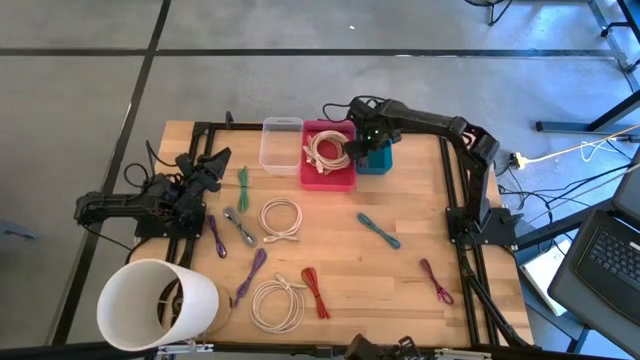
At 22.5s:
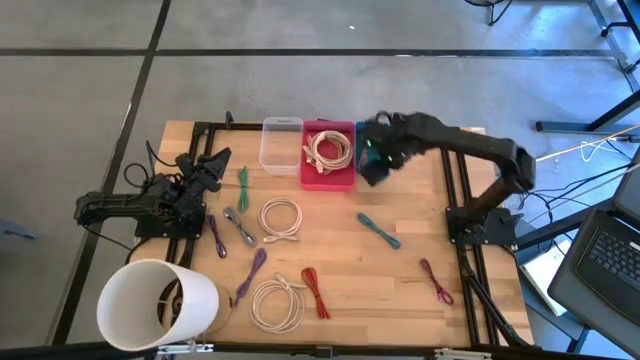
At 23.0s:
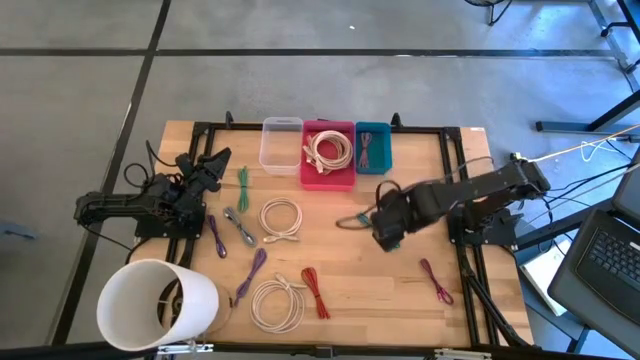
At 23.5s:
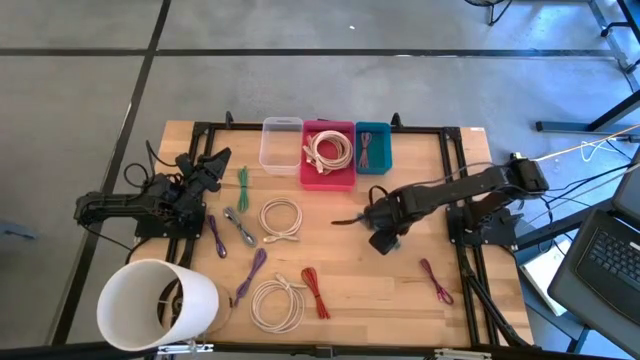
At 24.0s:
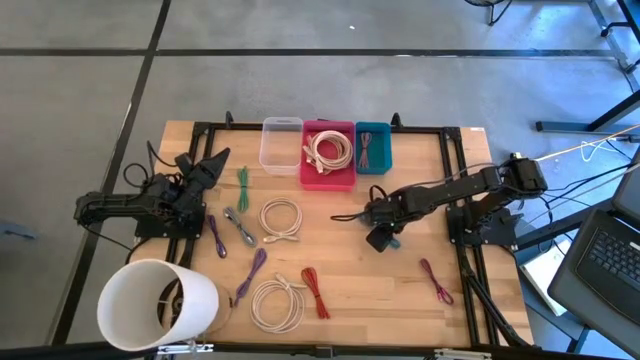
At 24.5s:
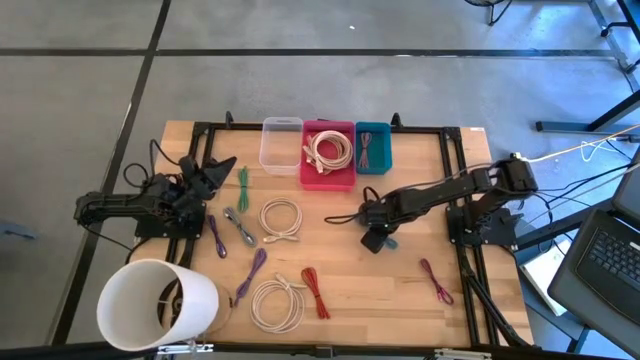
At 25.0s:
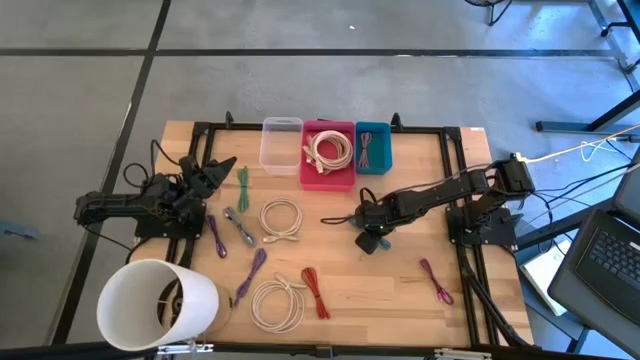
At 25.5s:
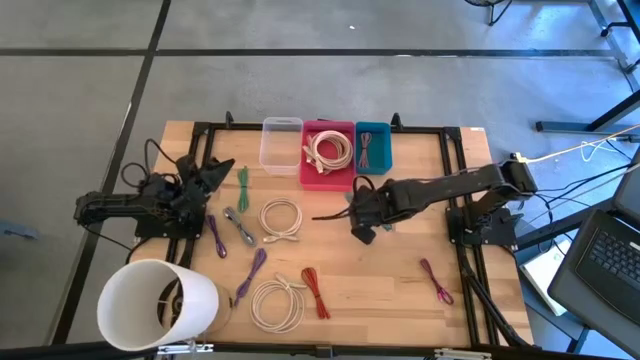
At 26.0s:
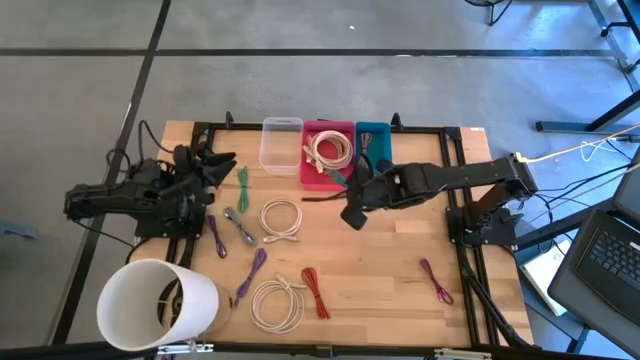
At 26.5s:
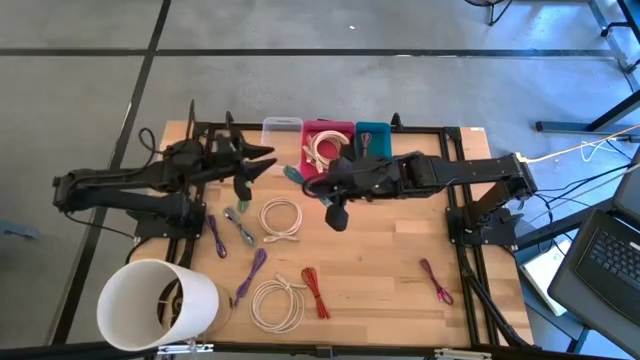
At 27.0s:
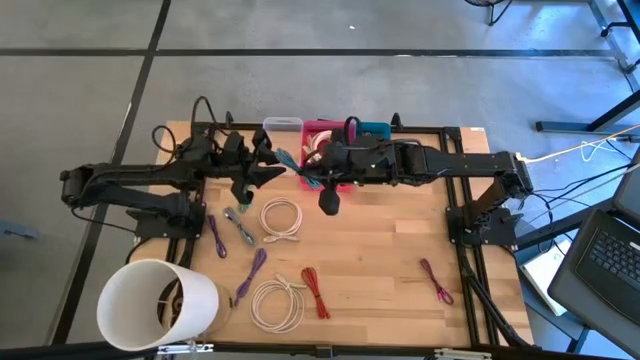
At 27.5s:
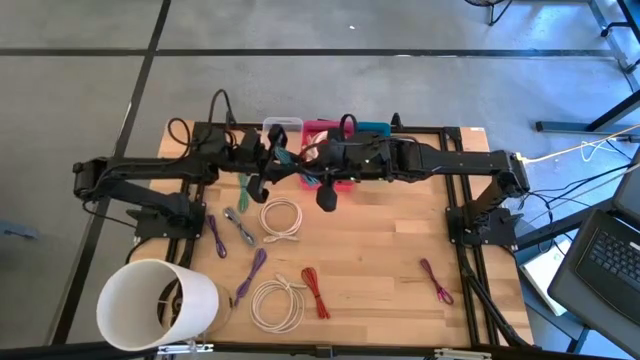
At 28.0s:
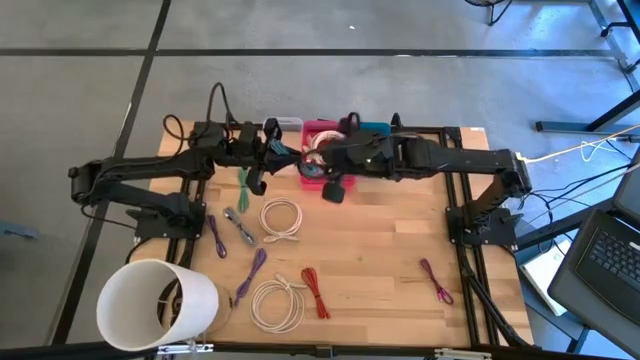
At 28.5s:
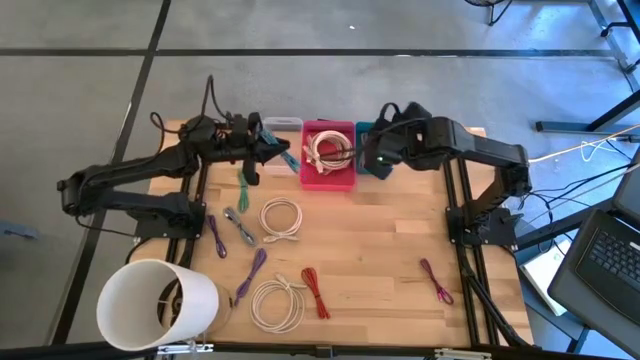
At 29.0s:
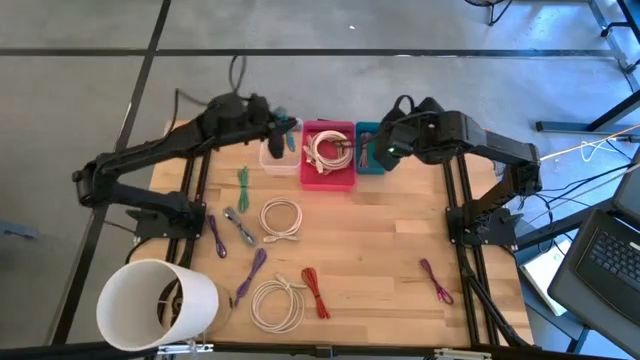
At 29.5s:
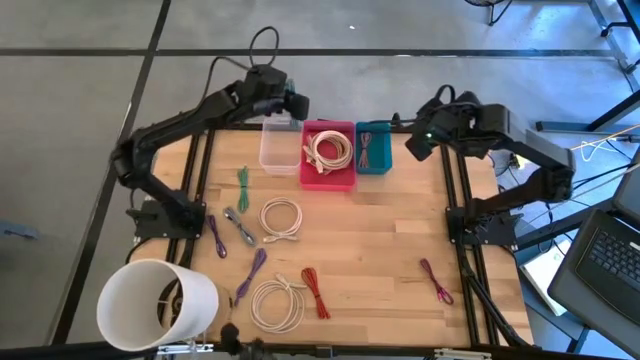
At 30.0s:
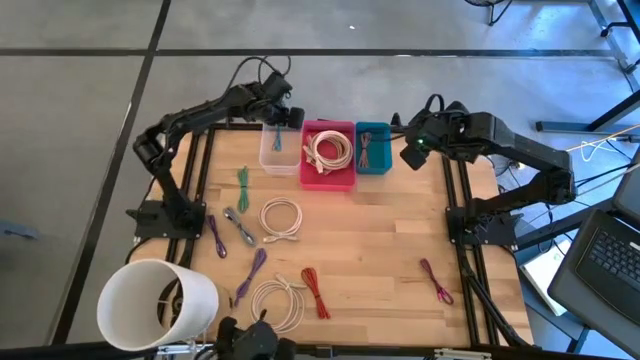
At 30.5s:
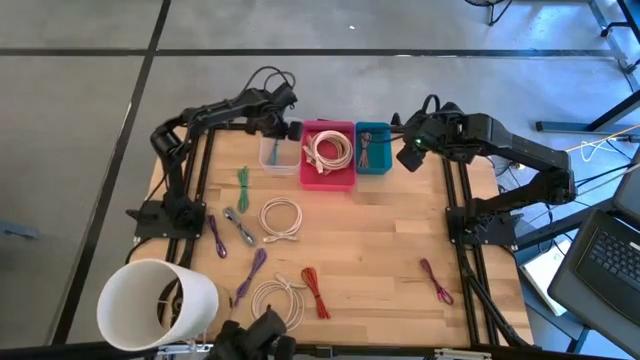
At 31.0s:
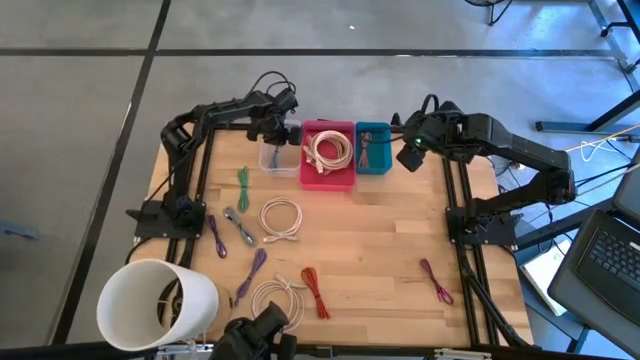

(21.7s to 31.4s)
Task: Pick & Place USB Port
Put the blue patterned USB cable into the transparent bin

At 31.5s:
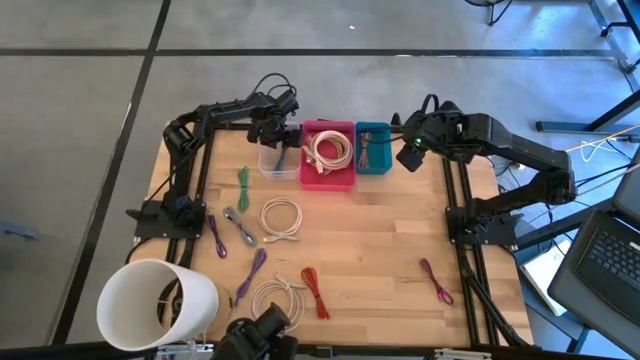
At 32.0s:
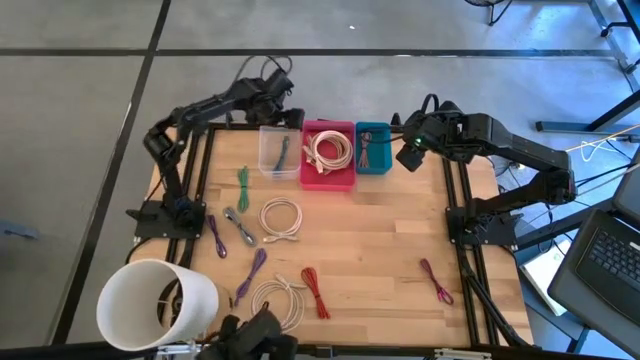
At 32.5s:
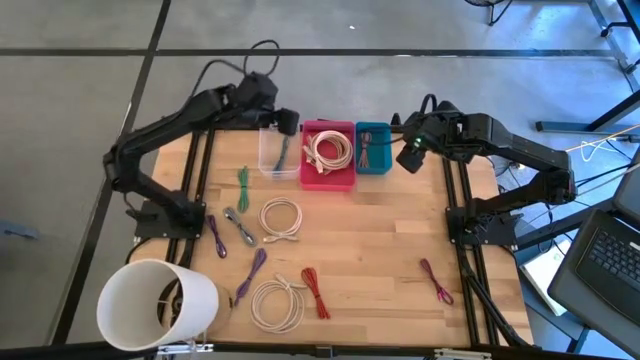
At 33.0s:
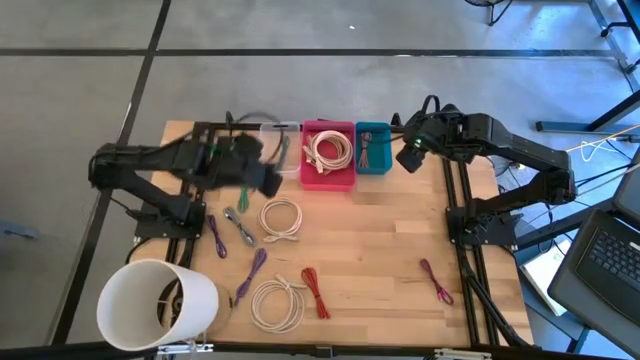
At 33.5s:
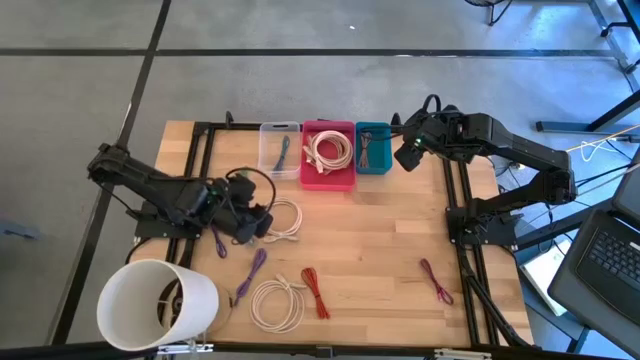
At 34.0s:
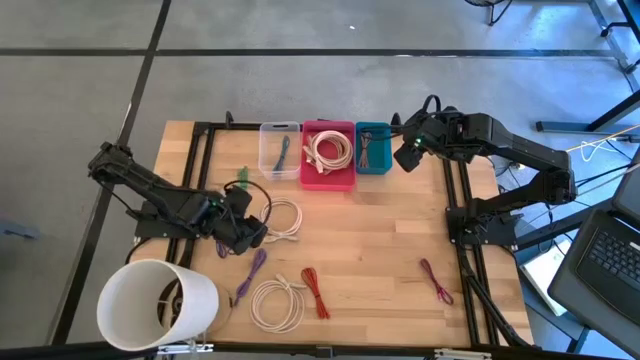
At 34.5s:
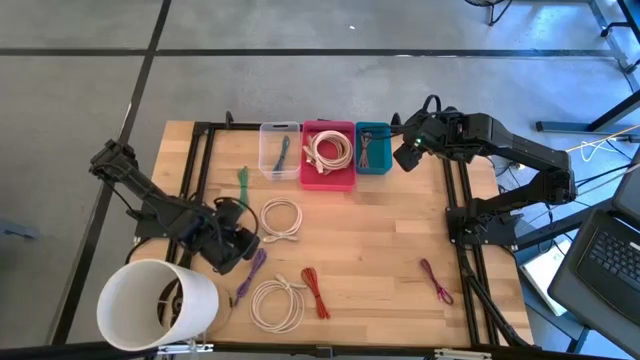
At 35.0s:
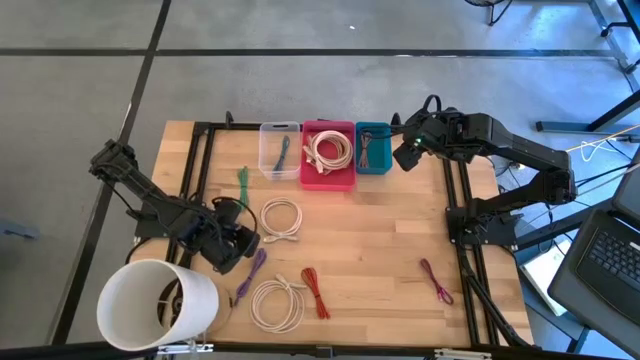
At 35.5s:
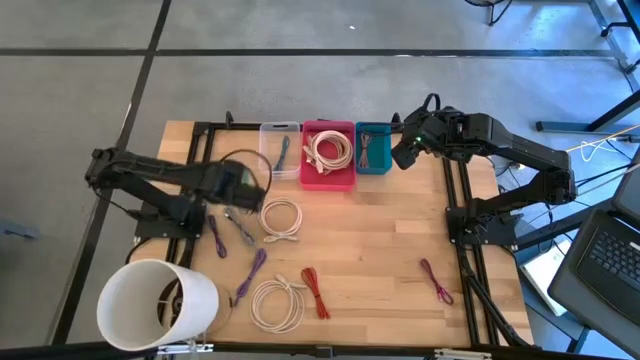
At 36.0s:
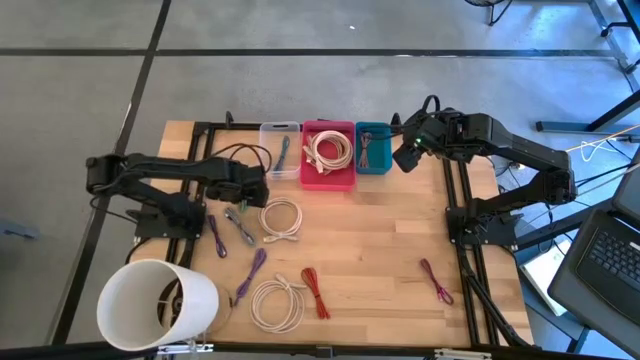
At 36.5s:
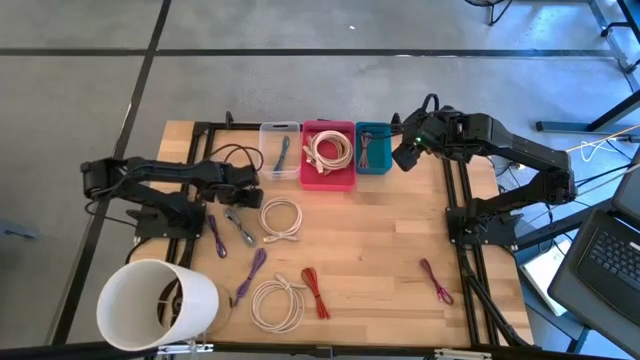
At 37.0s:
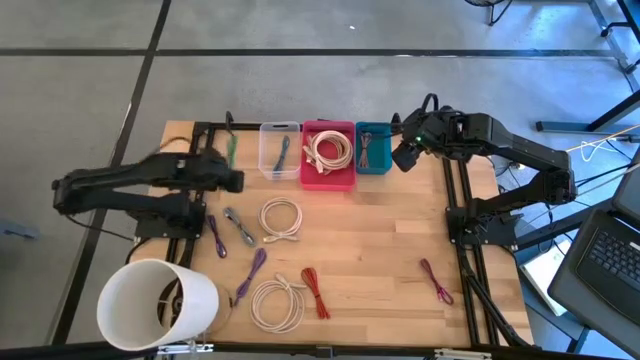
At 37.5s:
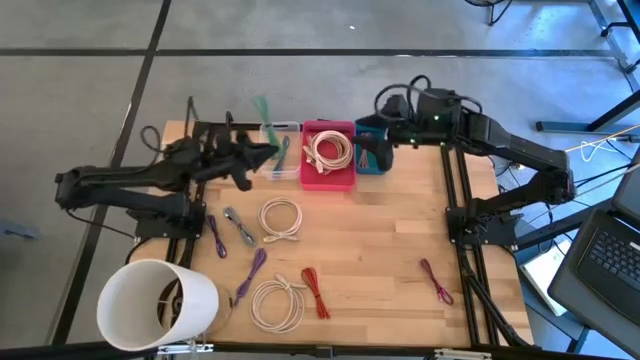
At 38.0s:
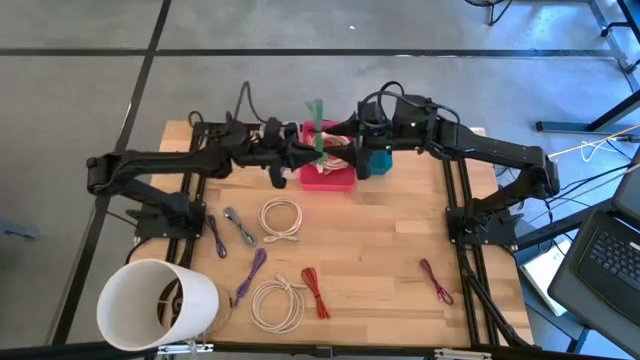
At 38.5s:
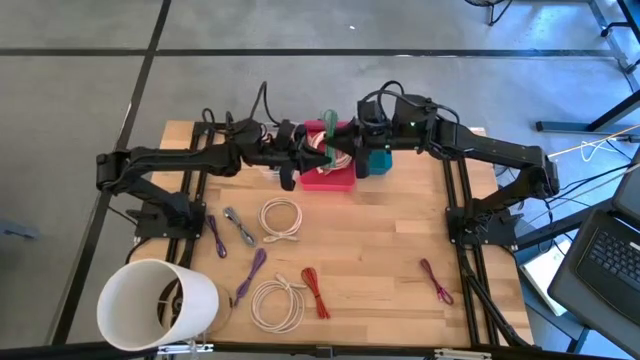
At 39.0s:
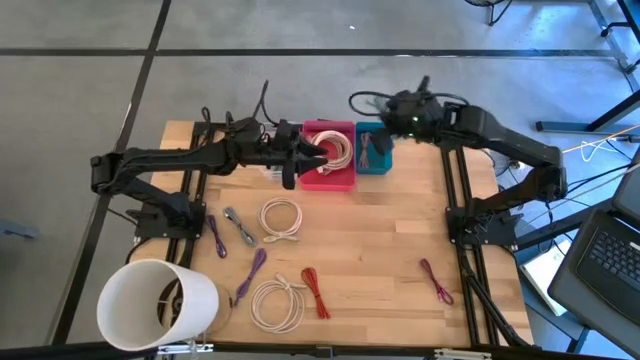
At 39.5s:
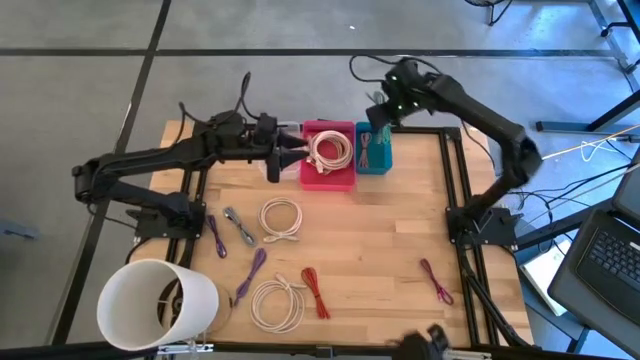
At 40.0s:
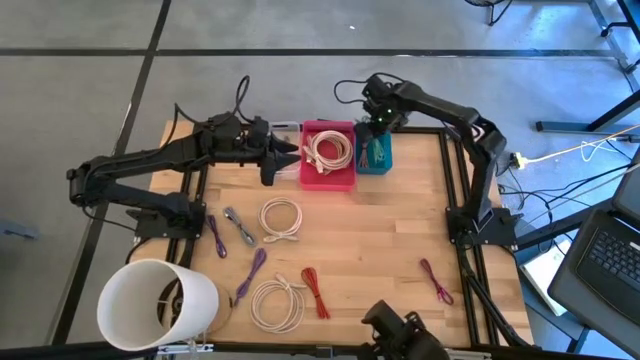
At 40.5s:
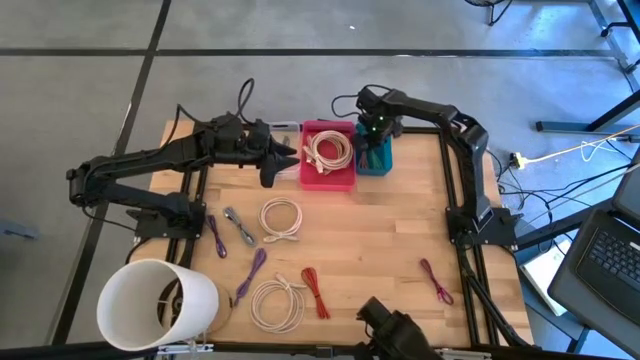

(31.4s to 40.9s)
Put the green USB cable into the blue bin

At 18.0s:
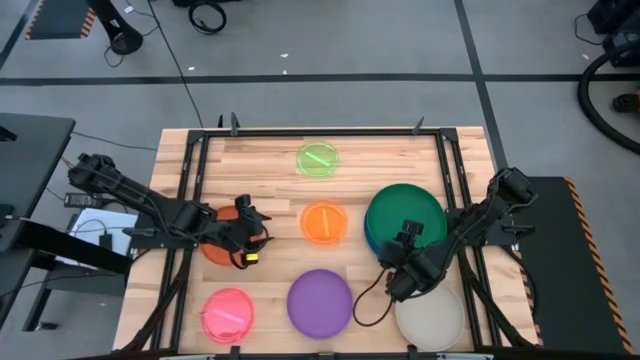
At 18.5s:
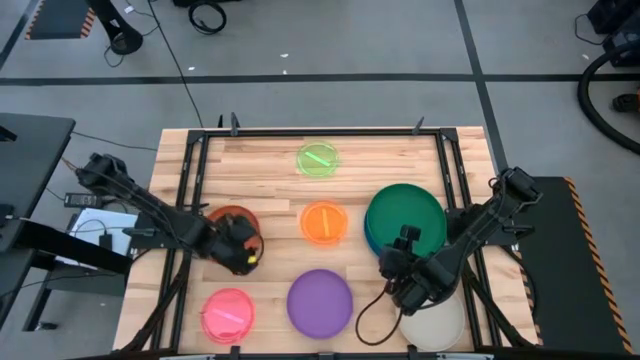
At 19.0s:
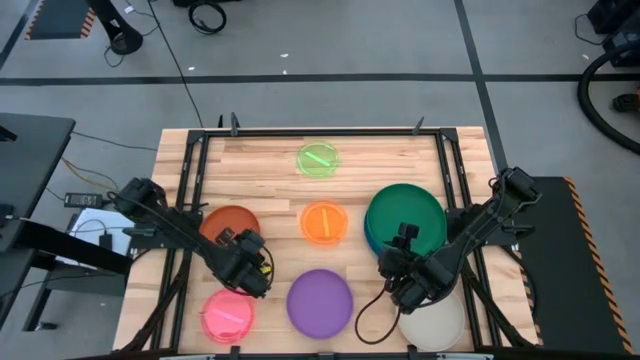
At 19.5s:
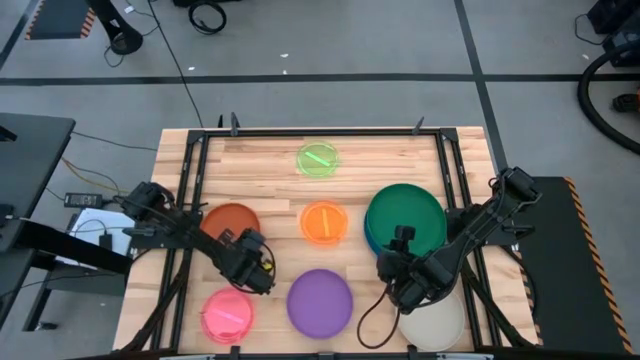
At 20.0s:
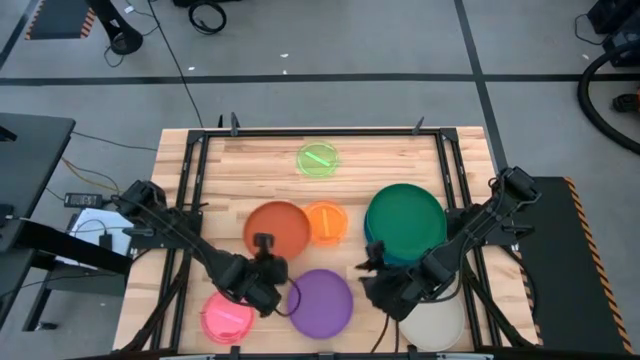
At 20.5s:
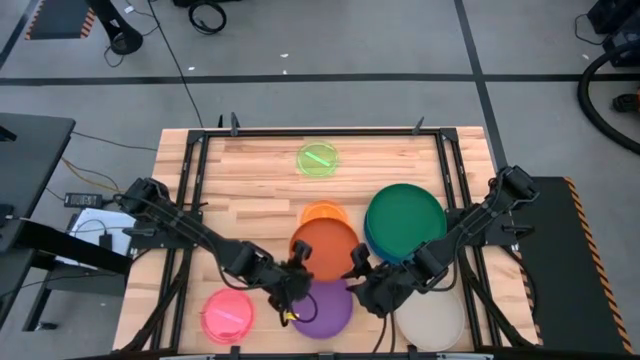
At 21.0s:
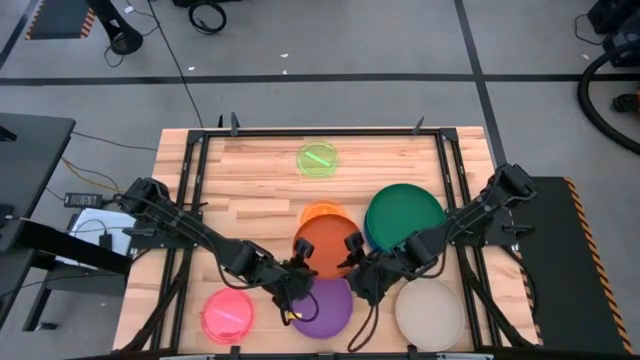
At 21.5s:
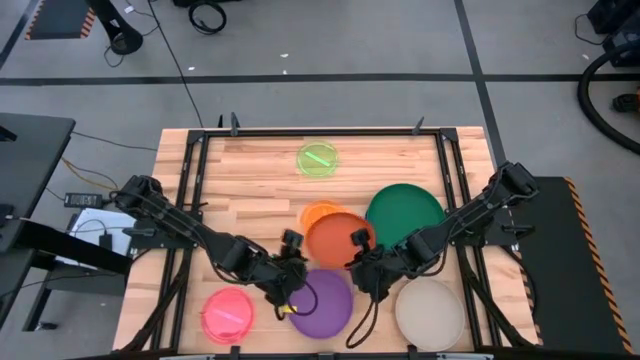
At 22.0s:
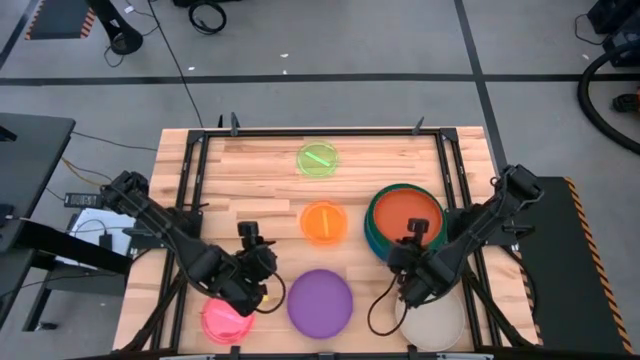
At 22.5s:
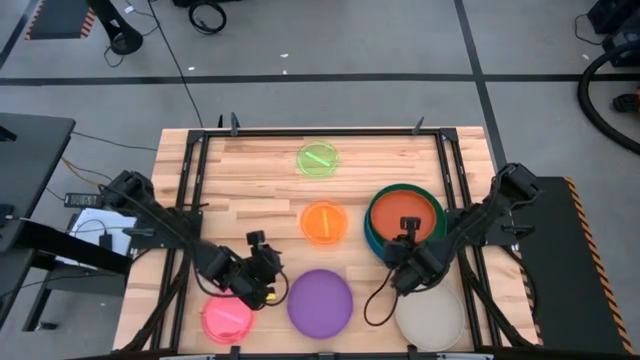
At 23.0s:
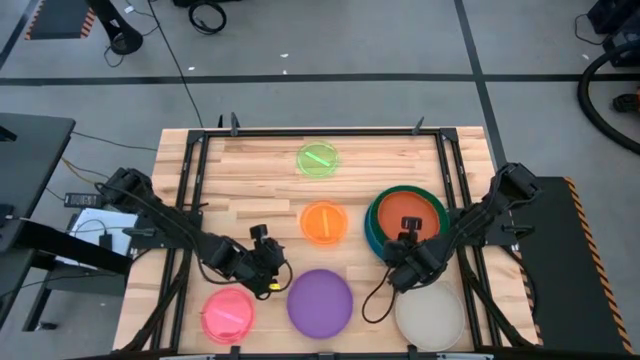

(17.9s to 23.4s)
Task: Stack plastic plates
Stack the dark orange plate on top of the dark green plate
